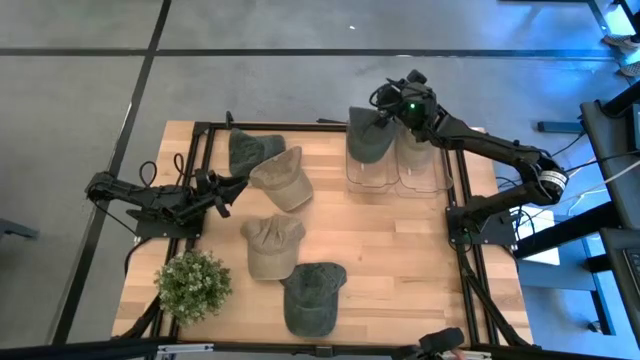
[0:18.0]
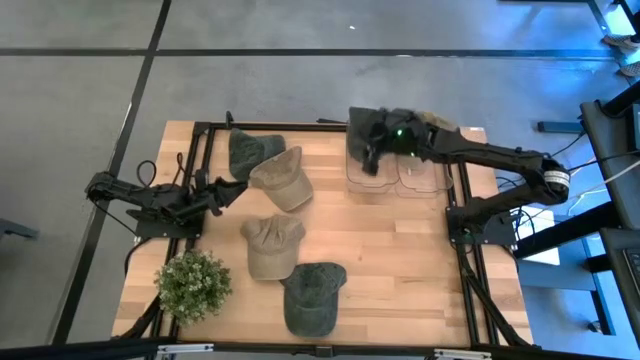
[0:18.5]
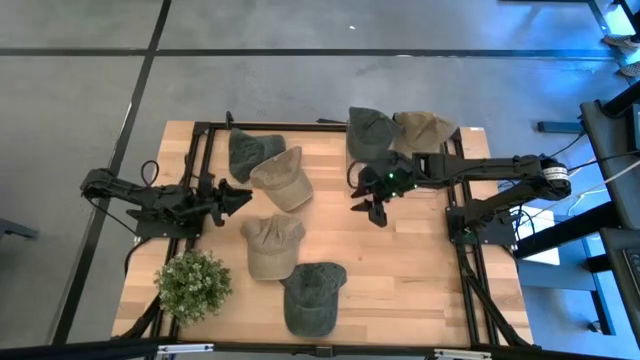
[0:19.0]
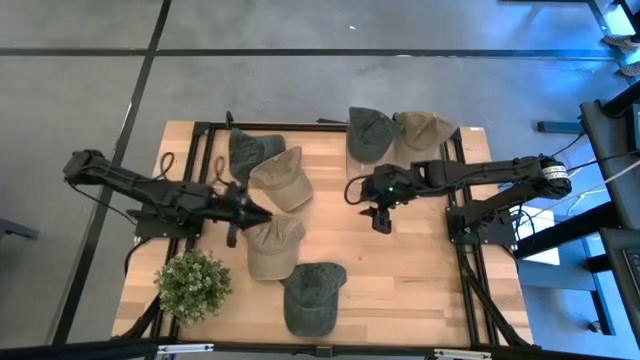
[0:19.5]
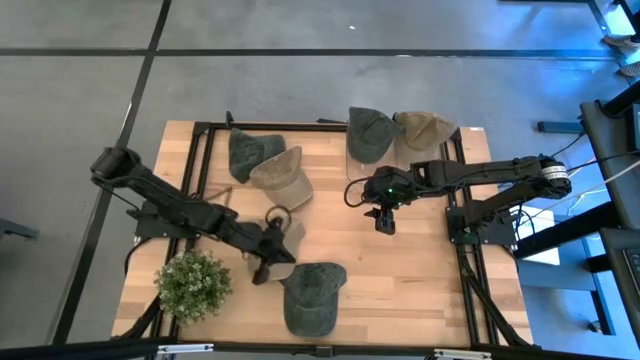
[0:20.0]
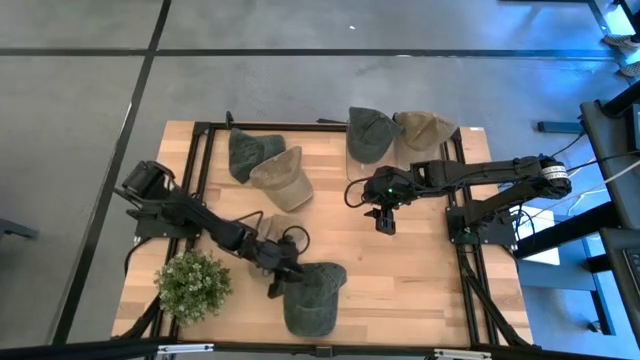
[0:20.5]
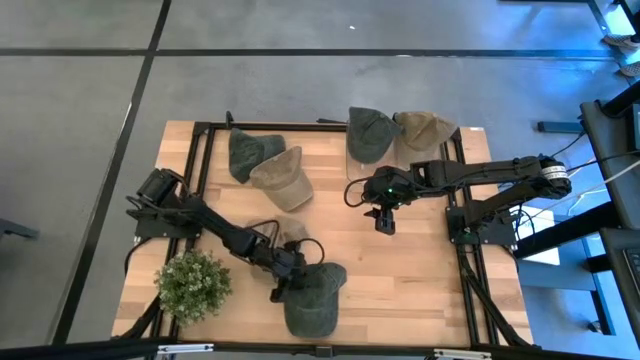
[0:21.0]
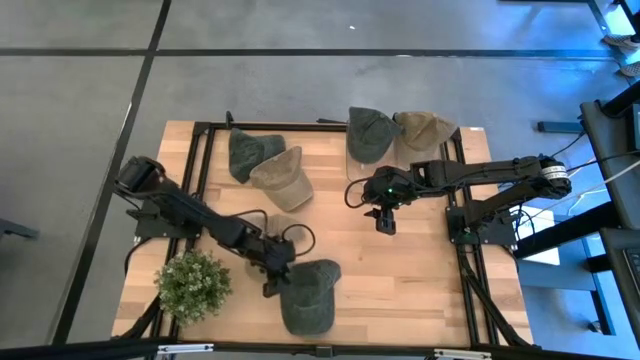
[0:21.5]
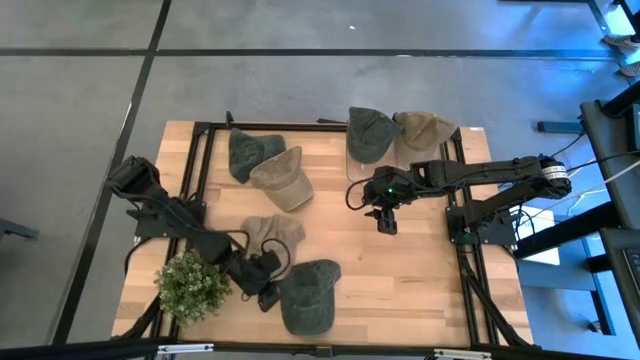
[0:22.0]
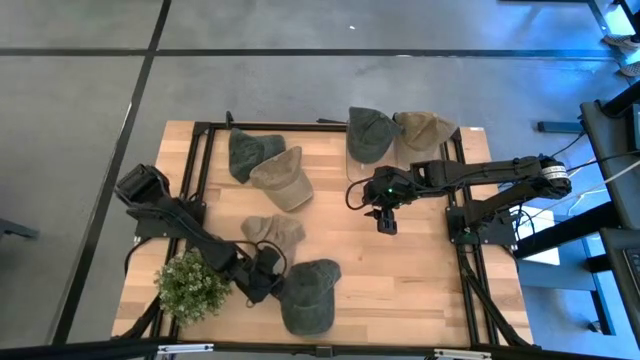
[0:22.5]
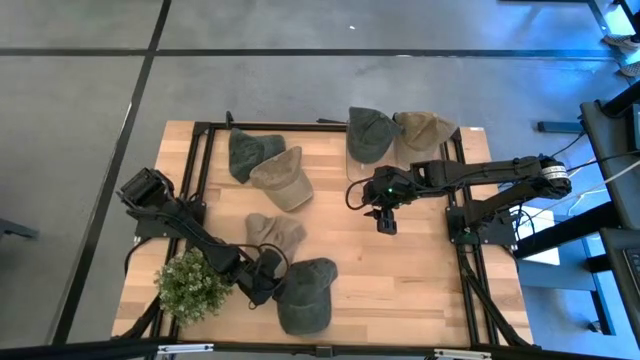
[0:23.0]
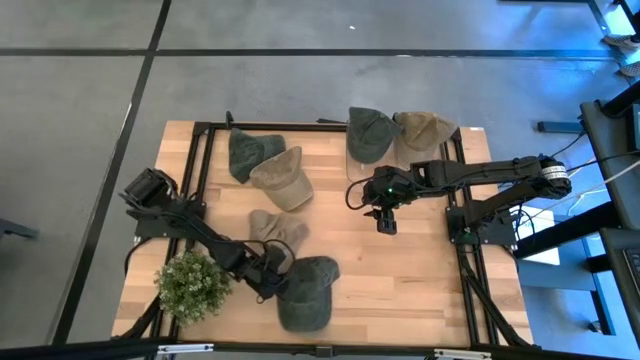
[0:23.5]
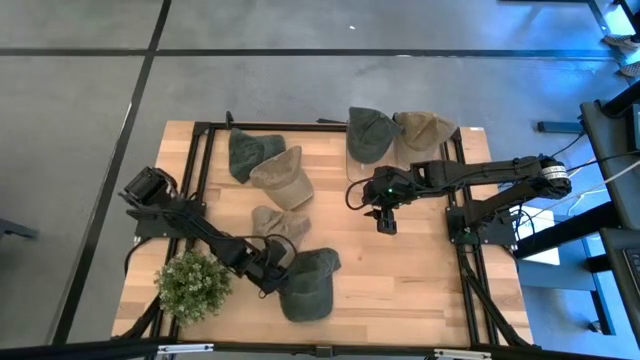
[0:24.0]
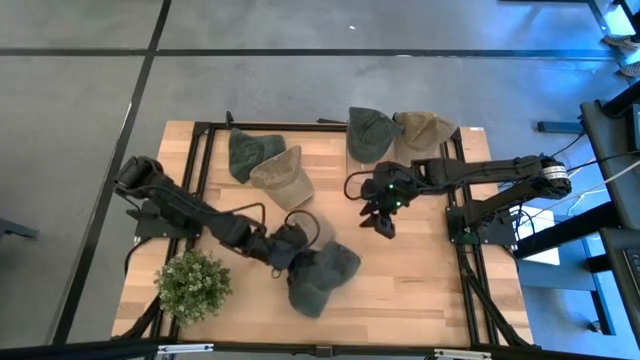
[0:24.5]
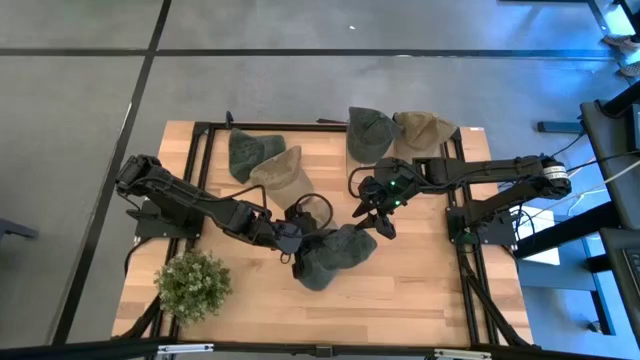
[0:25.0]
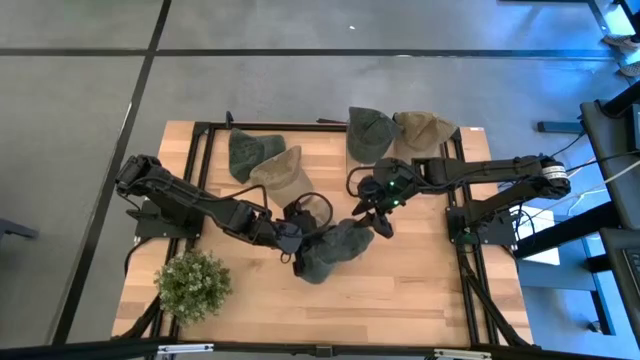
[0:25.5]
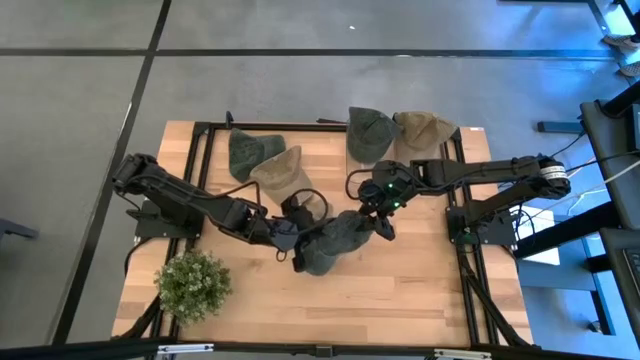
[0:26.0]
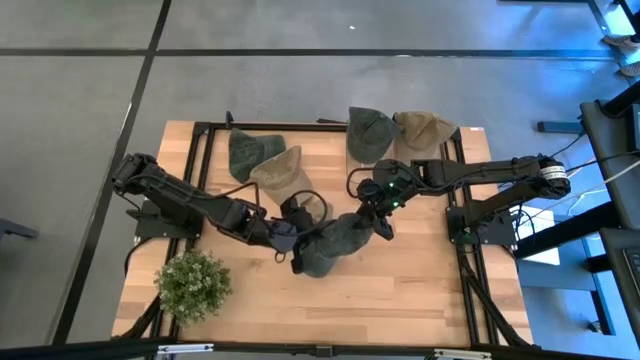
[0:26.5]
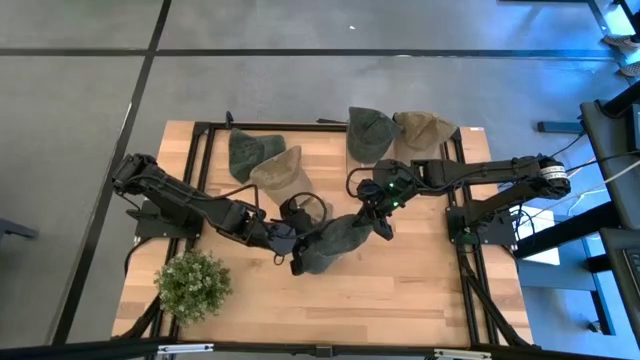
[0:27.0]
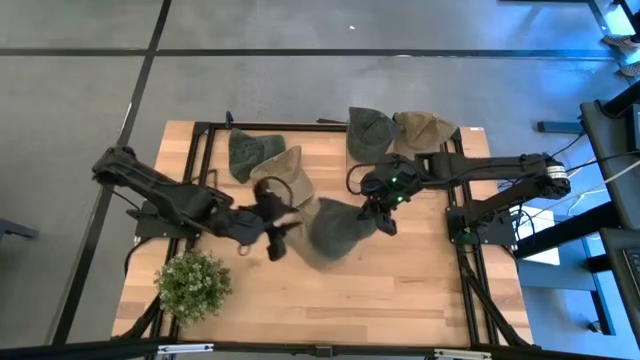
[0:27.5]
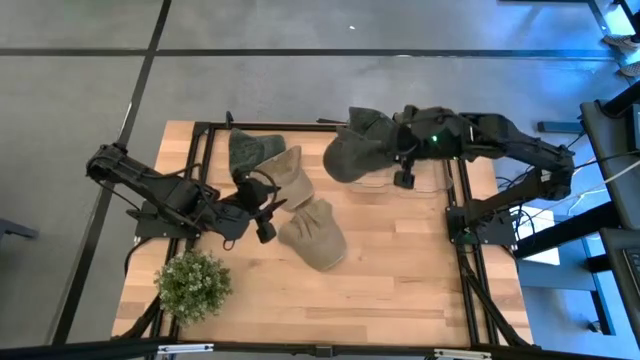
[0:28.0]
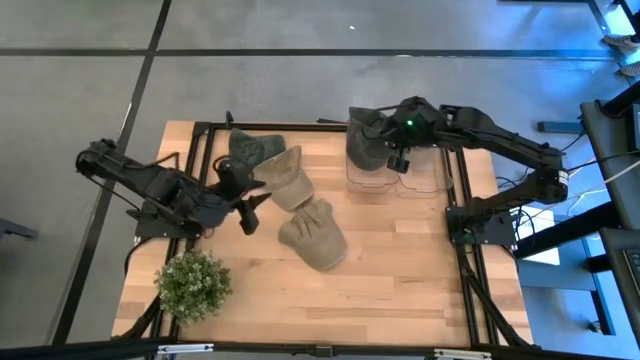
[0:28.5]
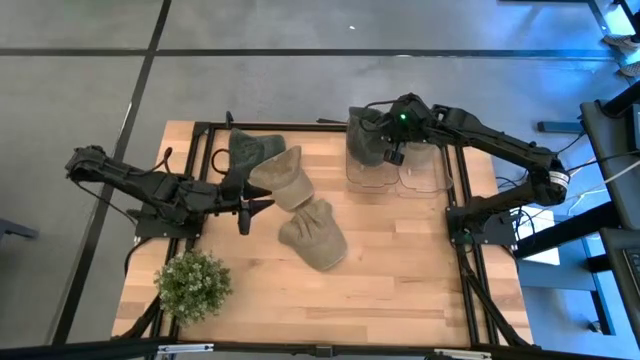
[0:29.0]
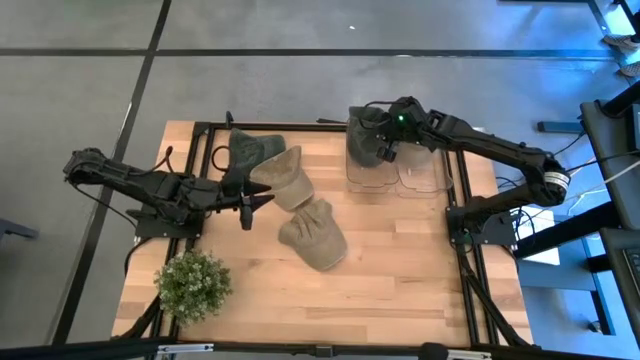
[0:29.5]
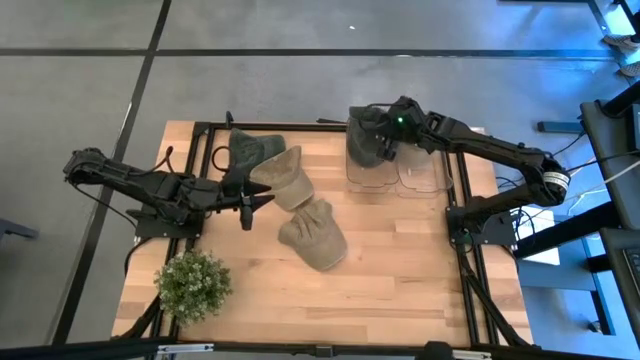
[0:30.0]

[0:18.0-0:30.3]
Task: Pick & Place hat
Put the bottom black cap into the left transparent bin

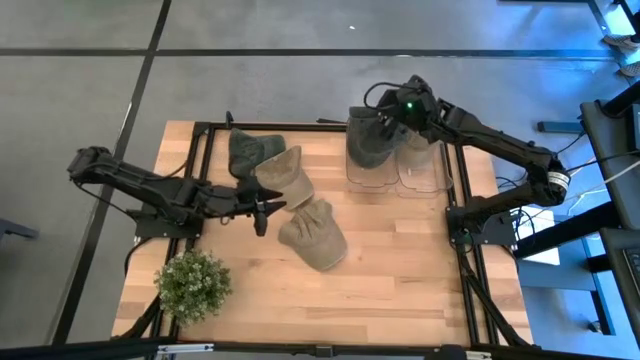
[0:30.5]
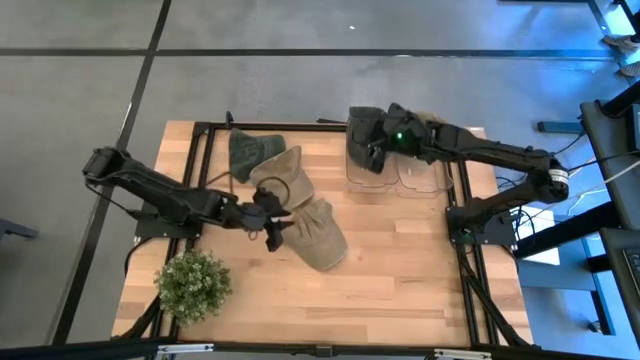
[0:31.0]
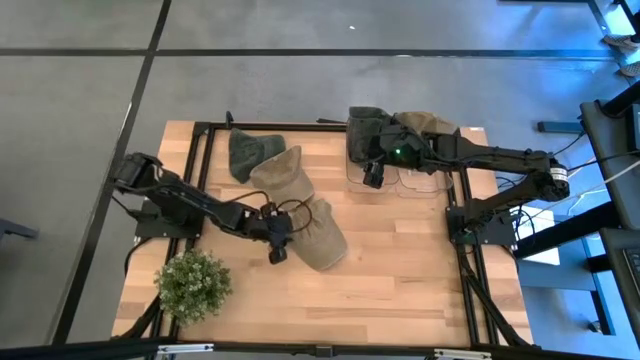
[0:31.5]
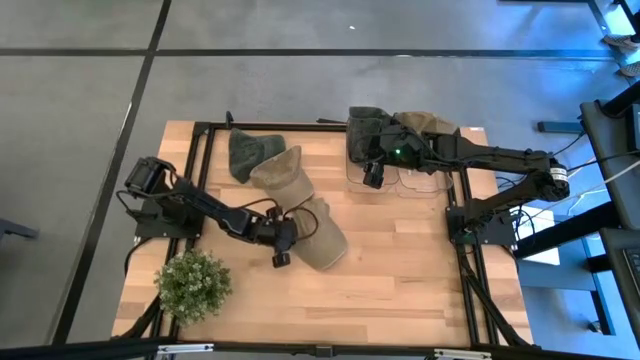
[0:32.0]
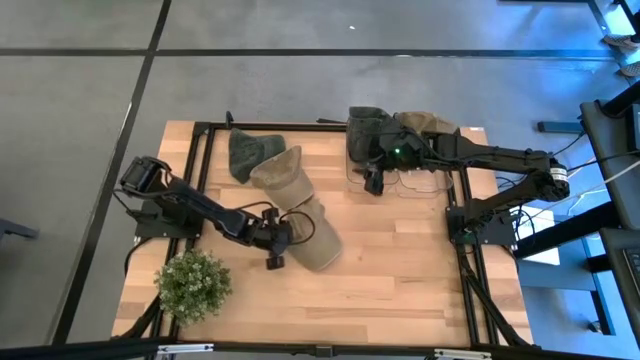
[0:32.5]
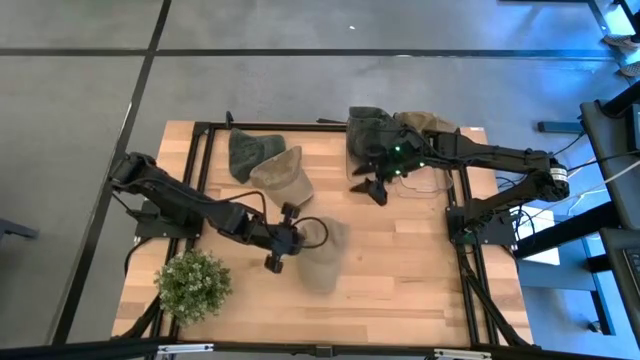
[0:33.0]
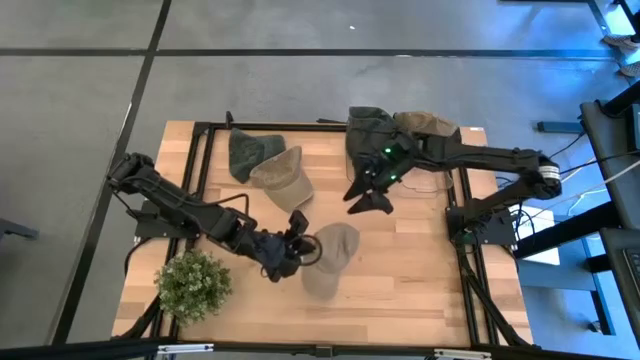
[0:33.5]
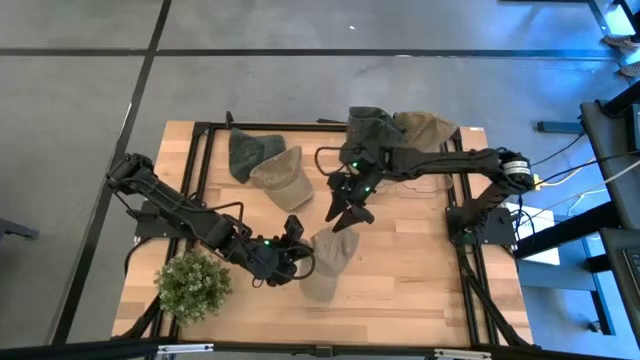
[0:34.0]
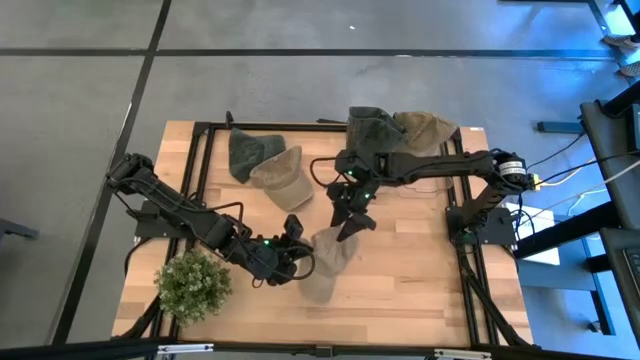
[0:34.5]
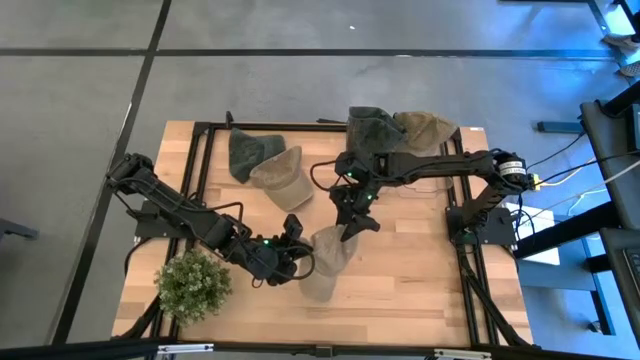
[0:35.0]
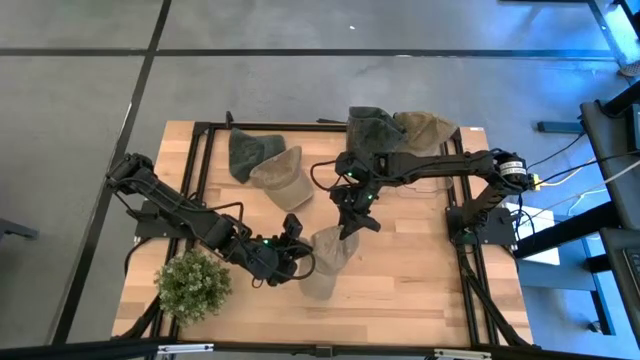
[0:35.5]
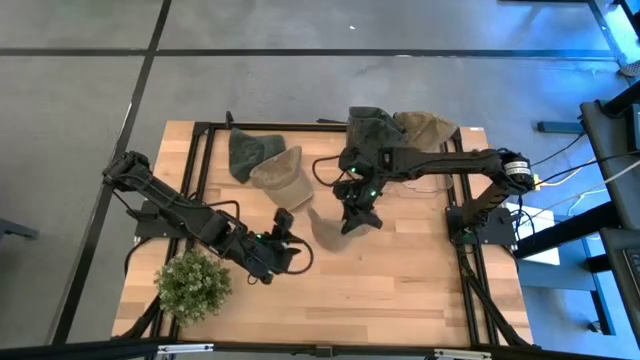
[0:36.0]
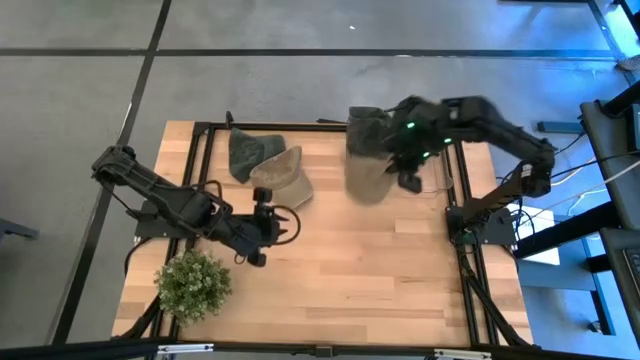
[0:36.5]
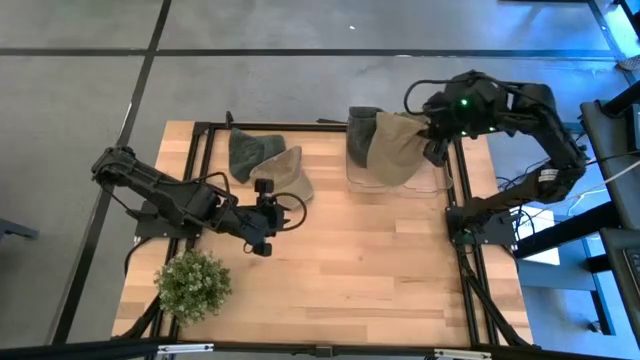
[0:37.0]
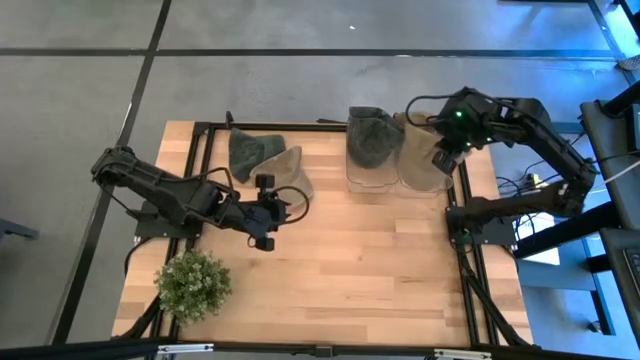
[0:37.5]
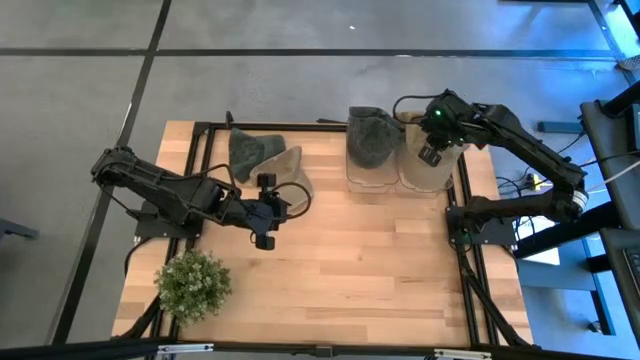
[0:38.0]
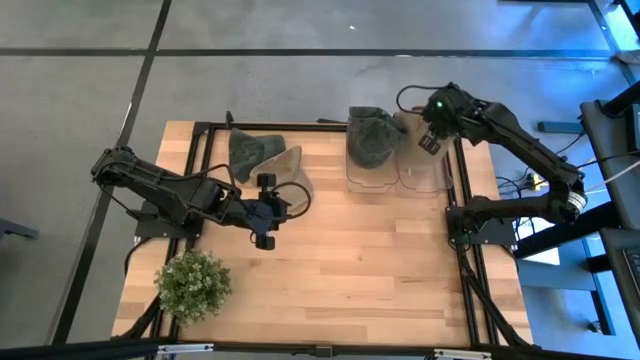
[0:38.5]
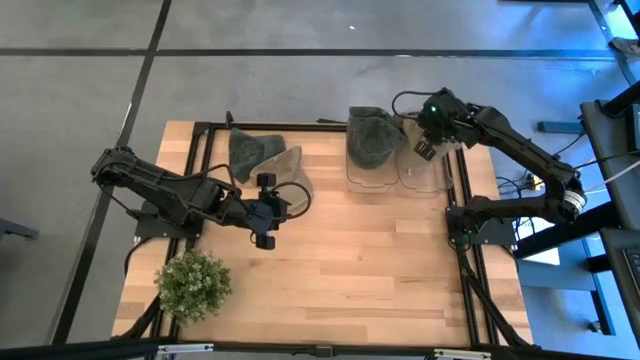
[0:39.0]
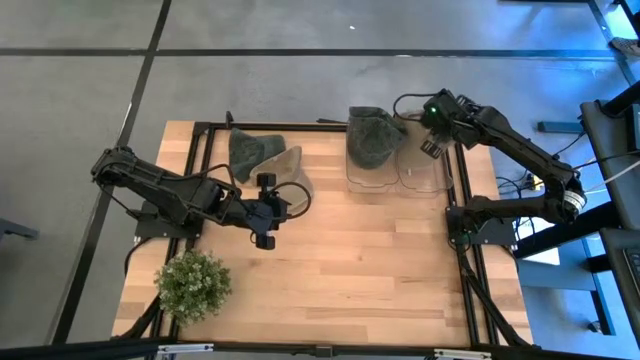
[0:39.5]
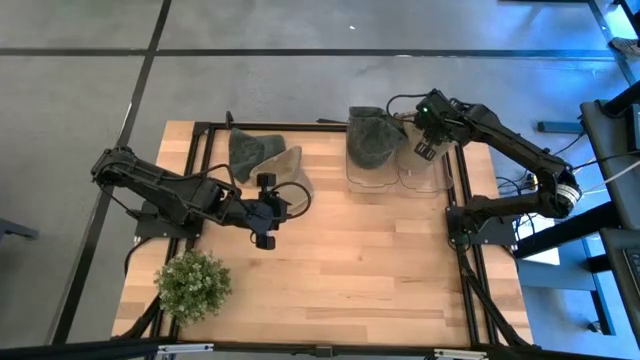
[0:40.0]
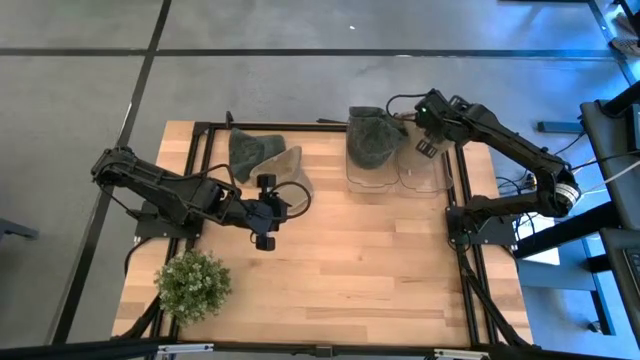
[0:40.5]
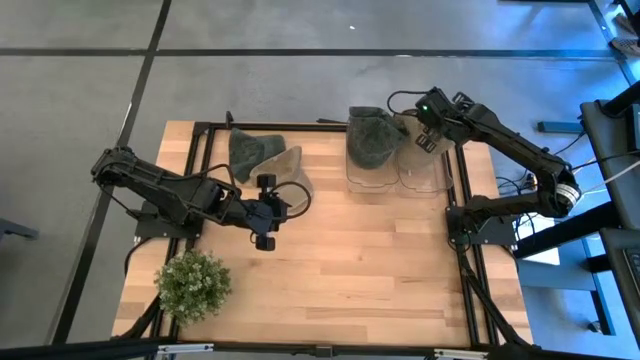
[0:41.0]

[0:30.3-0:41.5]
Put the bottom brown cap into the right transparent bin
